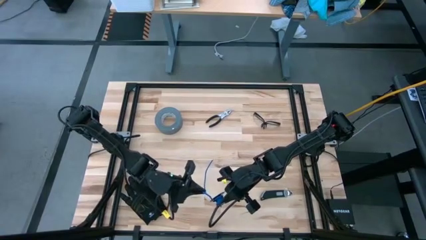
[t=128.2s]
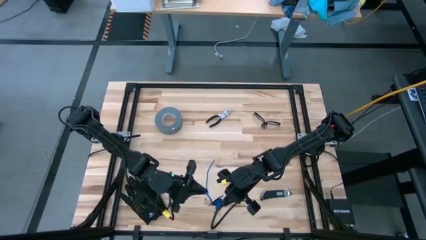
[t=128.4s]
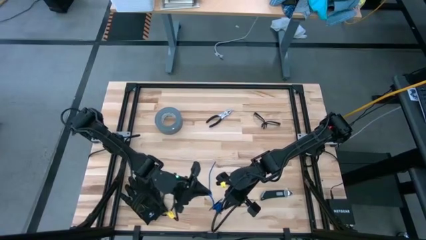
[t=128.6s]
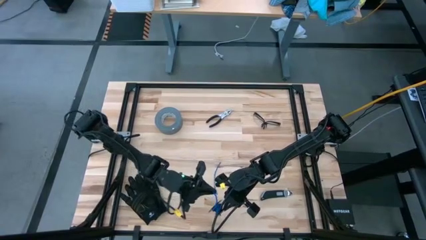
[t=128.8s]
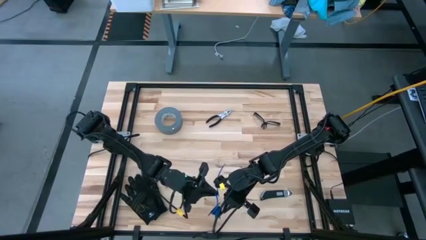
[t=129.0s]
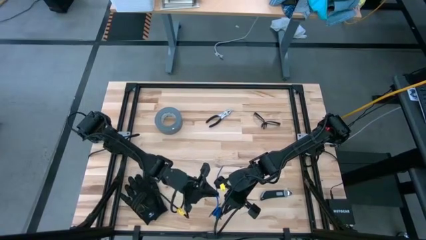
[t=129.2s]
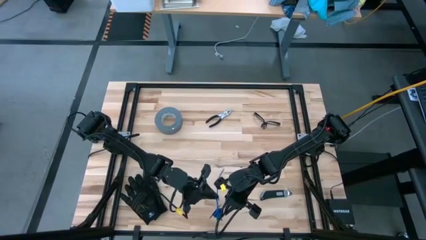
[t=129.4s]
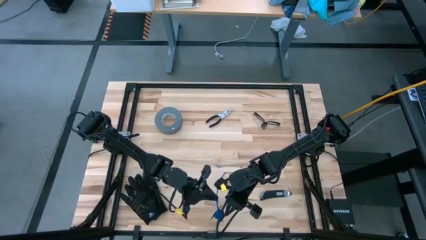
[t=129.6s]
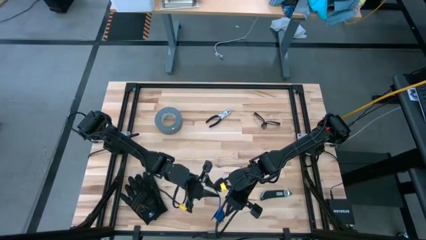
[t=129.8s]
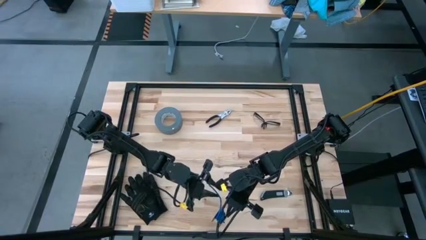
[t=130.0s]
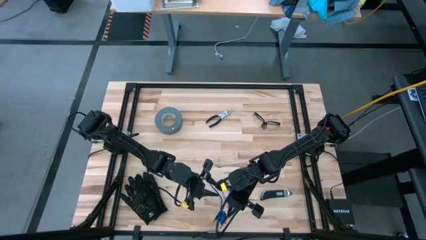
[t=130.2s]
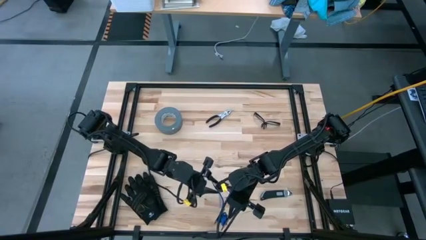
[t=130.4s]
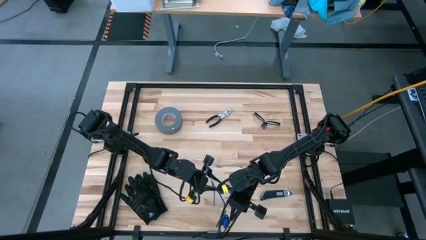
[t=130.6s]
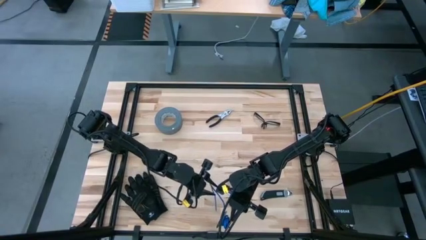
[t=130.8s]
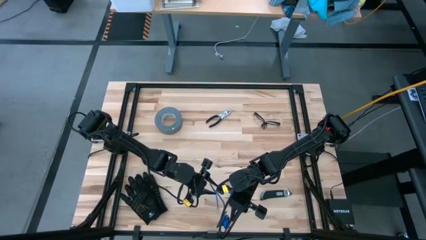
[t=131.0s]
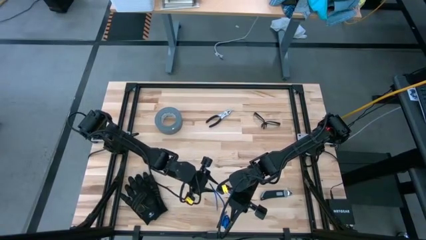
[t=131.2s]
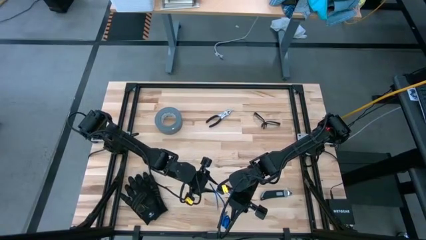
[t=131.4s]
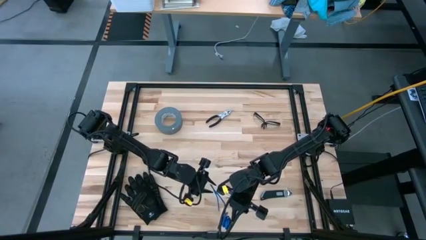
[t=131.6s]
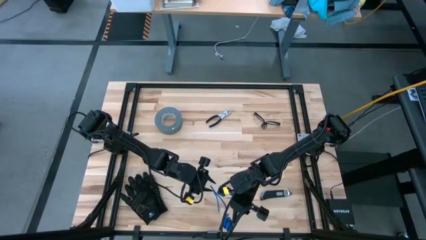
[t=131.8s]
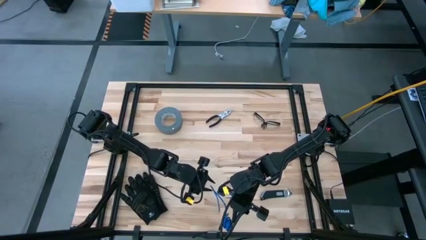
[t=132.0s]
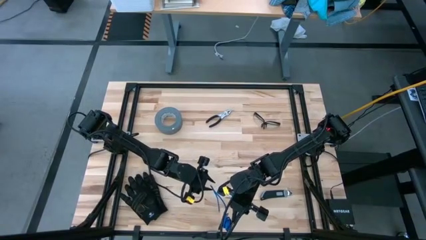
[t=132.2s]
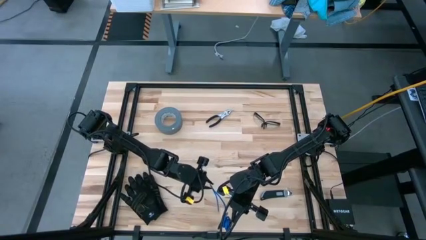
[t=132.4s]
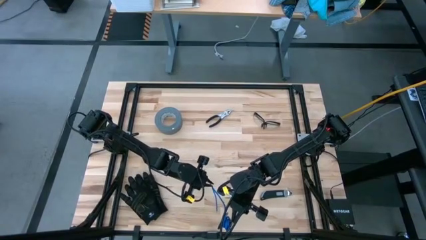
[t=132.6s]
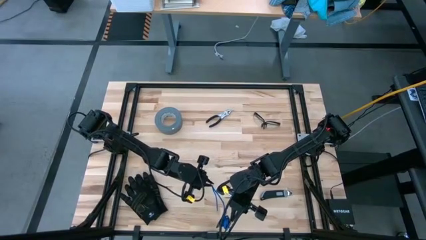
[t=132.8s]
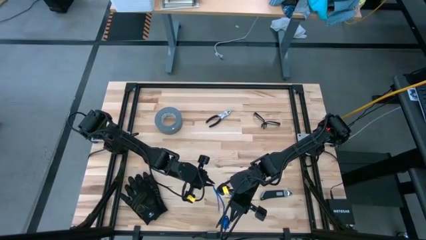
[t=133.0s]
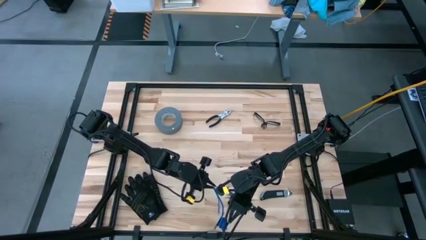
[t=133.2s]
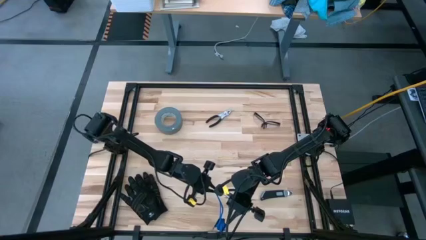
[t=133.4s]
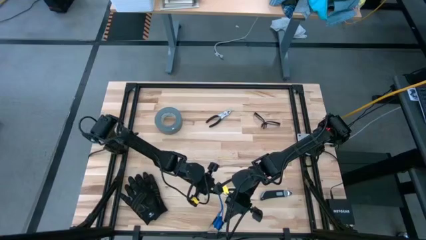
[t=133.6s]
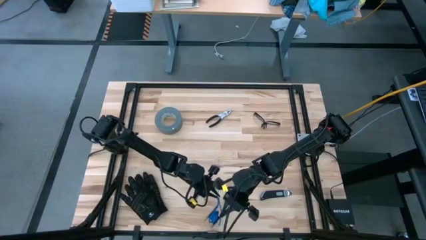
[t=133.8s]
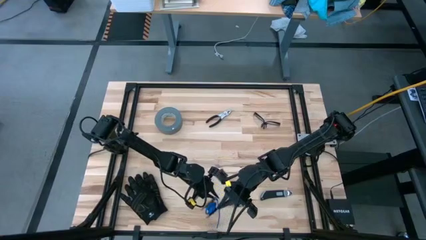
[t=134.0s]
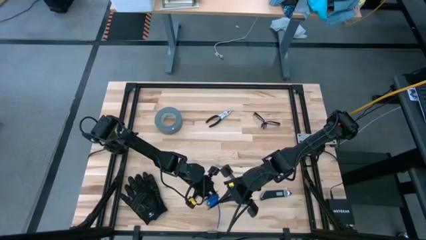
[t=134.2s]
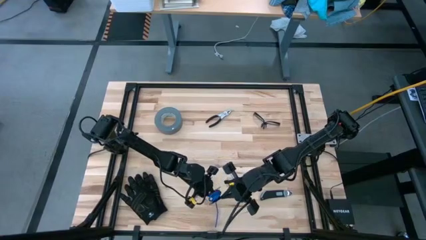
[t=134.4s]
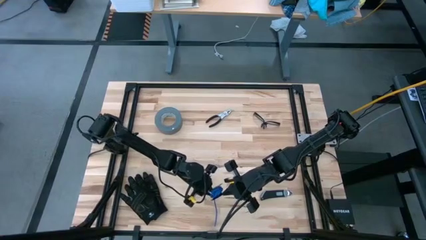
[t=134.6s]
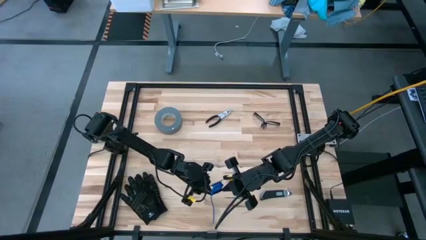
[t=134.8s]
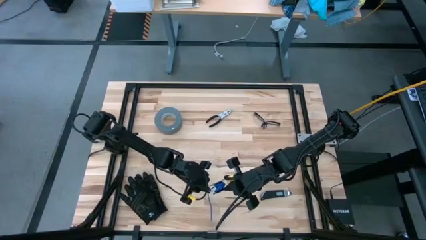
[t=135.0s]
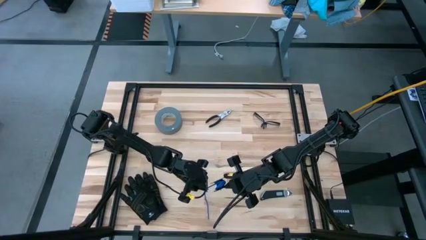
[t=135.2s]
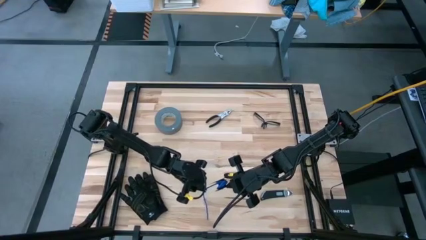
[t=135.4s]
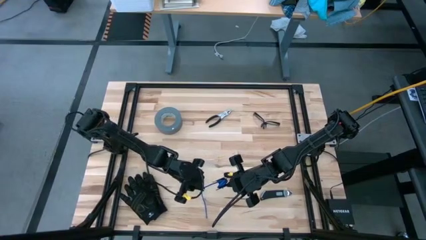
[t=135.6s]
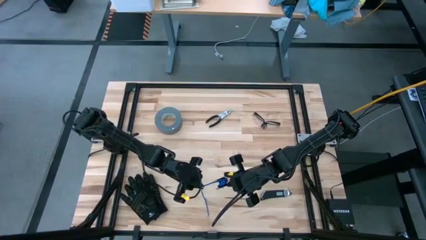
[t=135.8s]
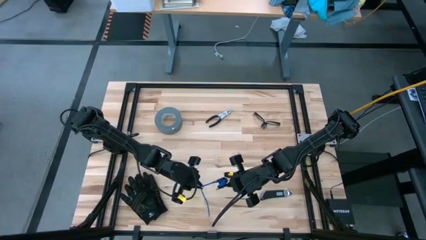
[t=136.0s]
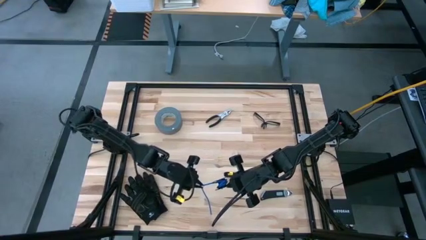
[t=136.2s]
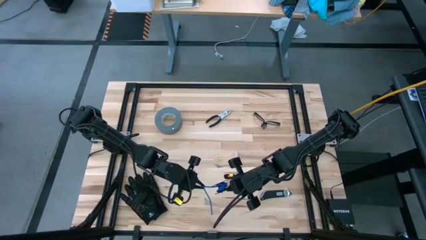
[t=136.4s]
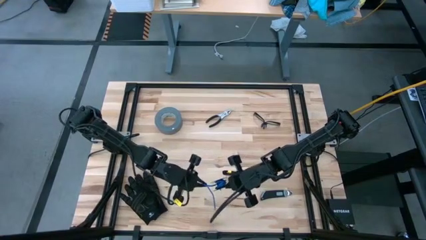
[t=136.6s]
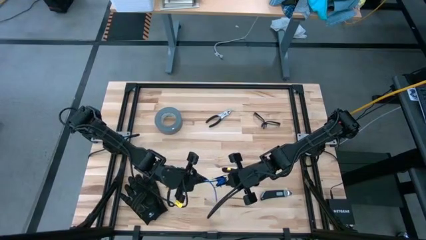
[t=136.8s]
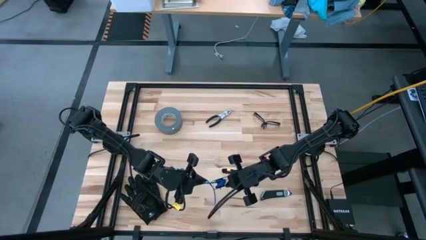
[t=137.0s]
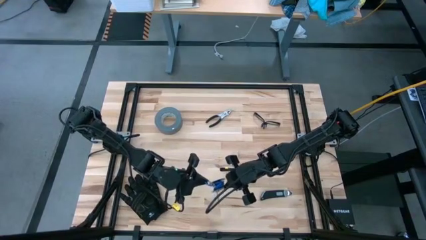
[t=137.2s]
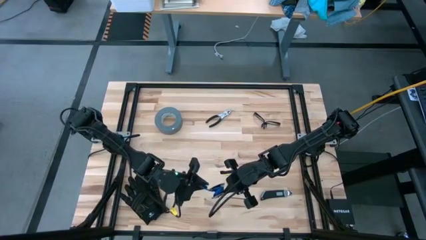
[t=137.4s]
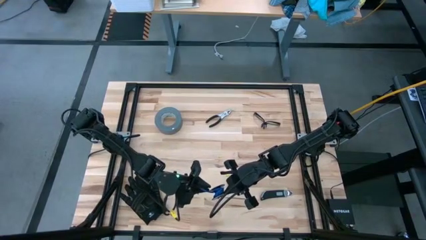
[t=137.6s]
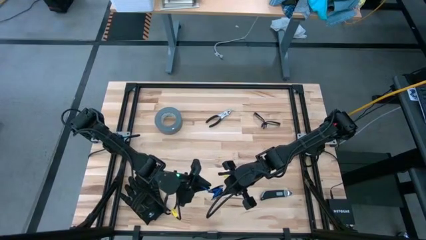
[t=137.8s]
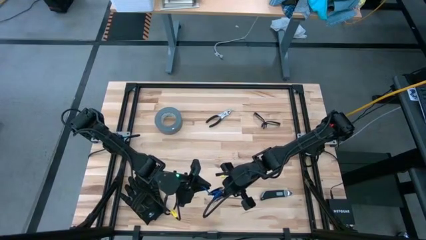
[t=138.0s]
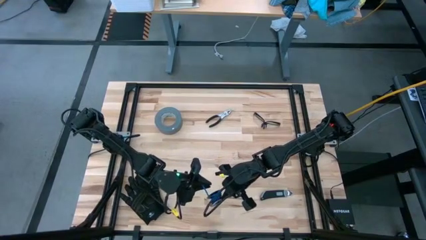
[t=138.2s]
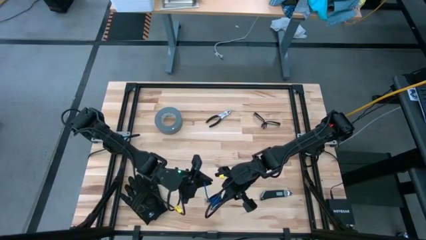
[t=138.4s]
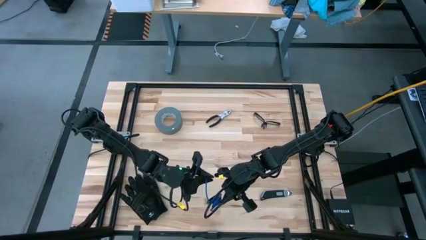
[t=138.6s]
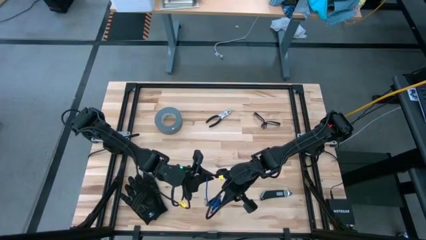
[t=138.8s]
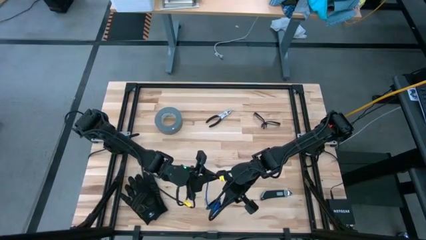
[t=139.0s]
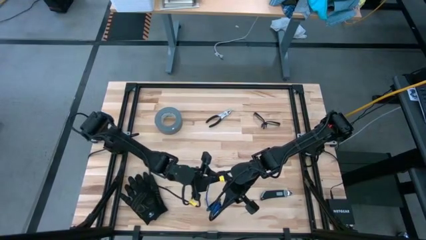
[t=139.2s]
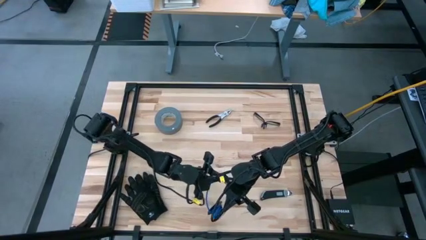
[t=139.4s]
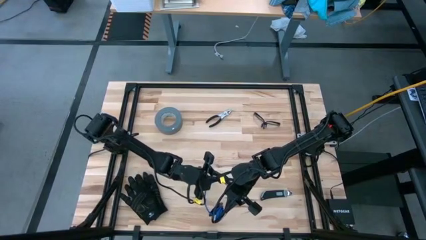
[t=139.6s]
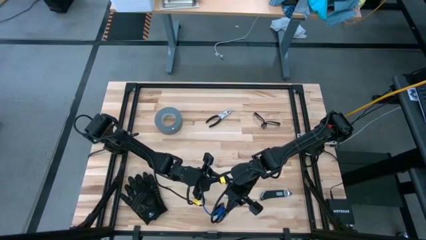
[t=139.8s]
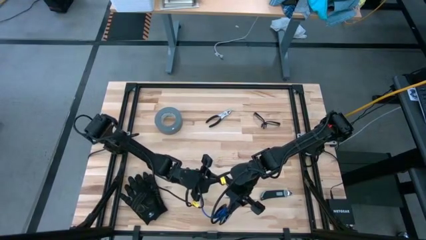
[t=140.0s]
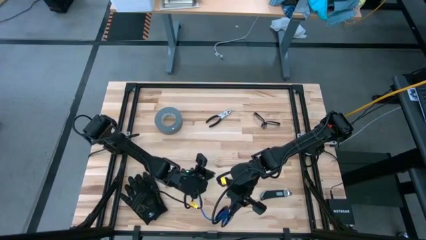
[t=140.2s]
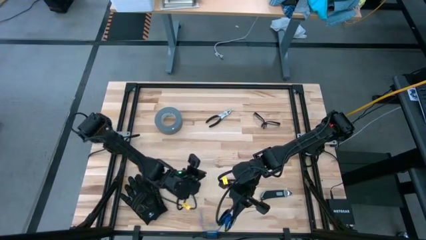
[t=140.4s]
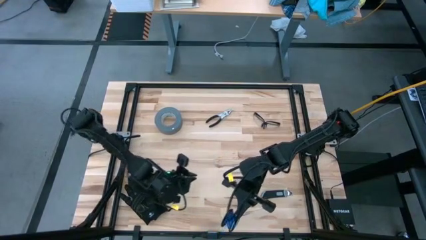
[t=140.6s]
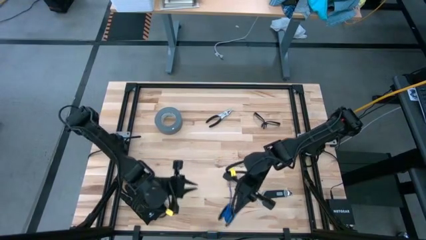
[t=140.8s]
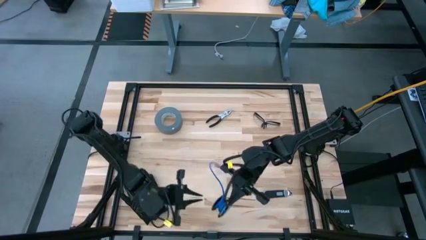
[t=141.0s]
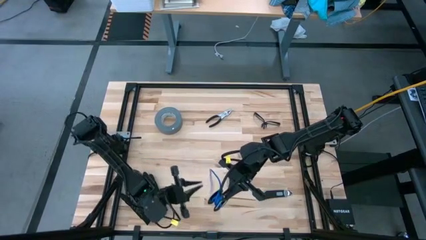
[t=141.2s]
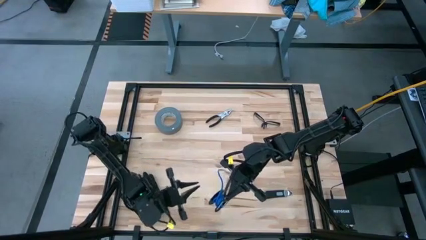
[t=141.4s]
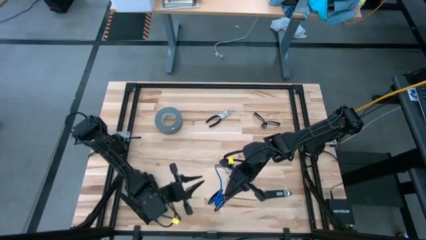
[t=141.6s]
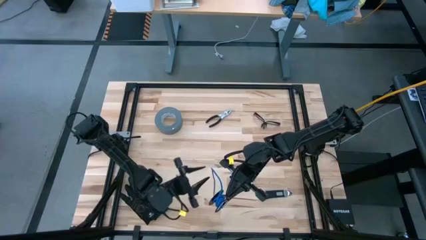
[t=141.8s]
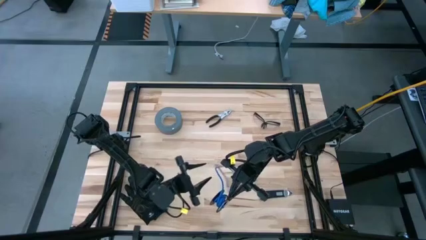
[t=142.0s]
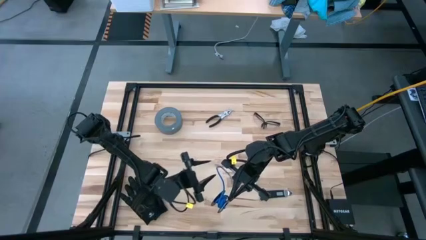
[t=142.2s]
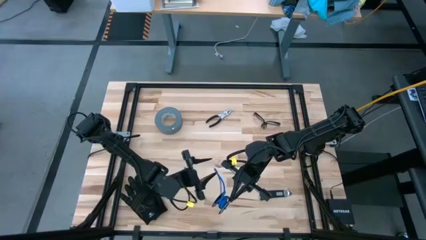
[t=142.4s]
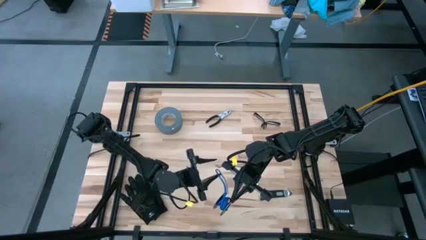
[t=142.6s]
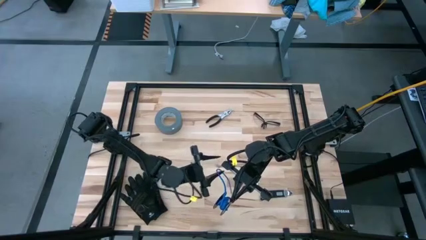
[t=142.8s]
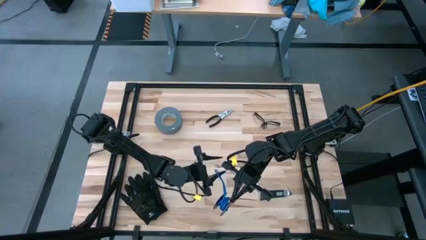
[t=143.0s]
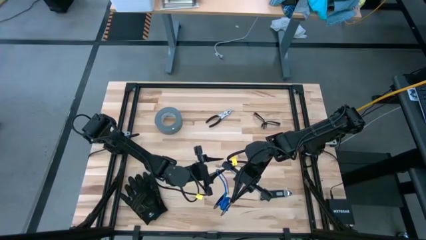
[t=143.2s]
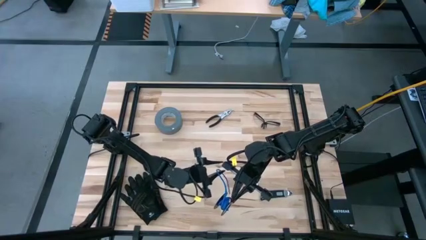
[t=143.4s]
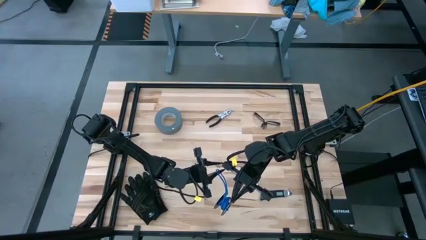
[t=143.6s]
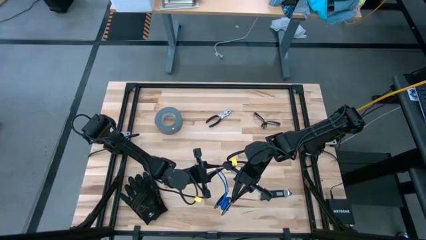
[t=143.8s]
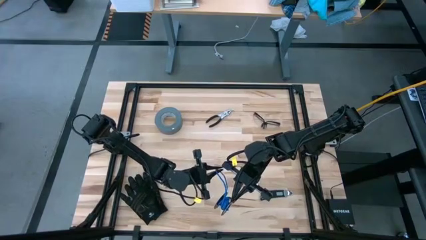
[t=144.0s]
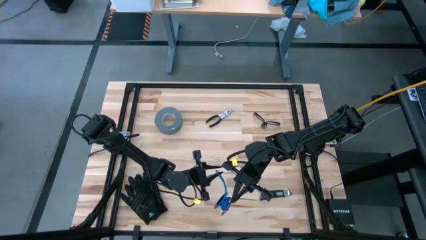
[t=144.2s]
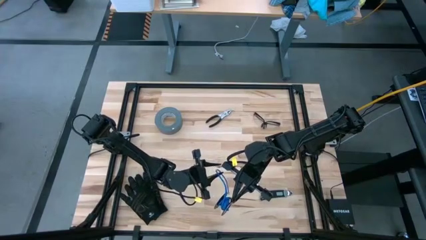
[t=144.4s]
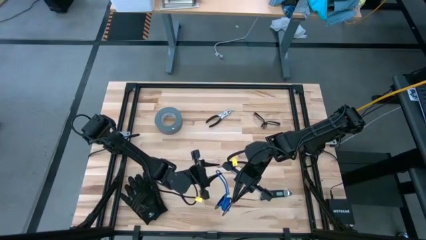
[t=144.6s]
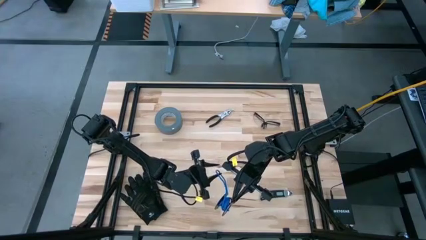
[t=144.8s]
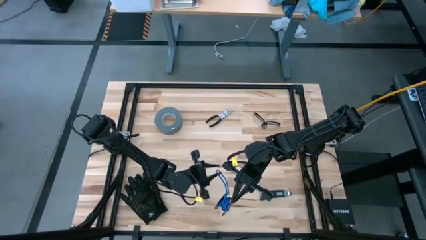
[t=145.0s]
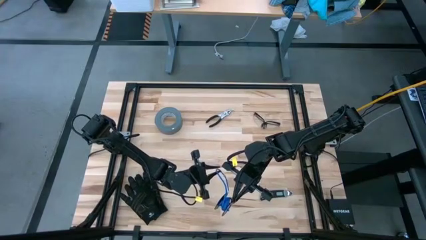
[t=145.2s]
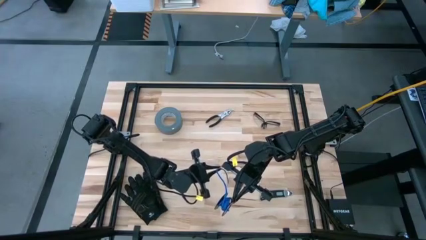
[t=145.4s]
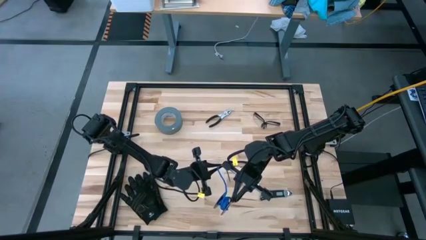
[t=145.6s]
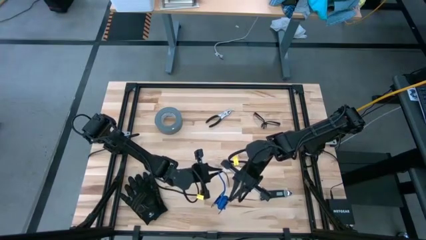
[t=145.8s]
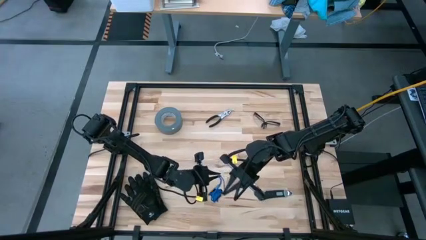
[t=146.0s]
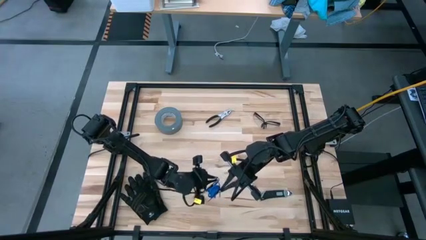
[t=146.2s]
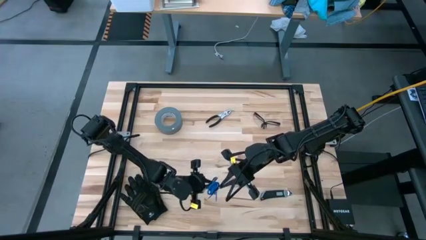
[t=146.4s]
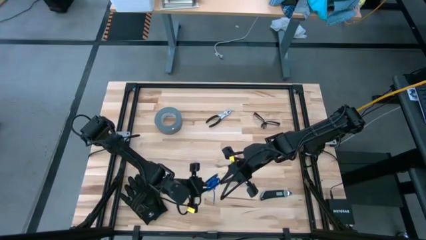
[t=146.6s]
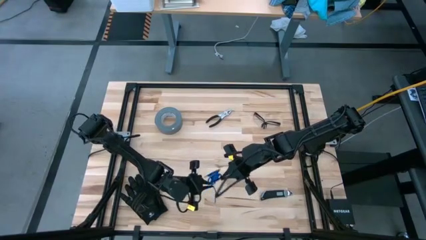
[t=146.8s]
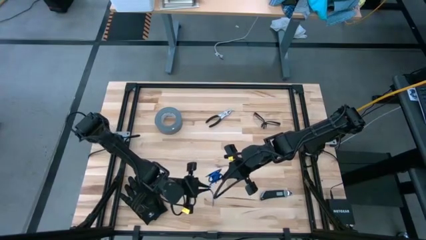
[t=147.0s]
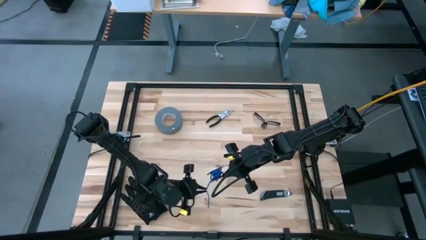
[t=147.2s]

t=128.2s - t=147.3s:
Task: Coil cords
Coil the blue wire cable onto the black spool
